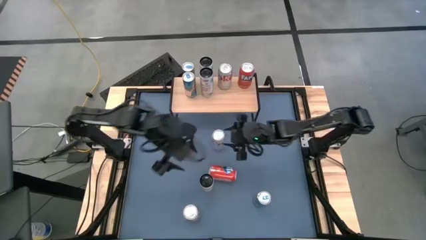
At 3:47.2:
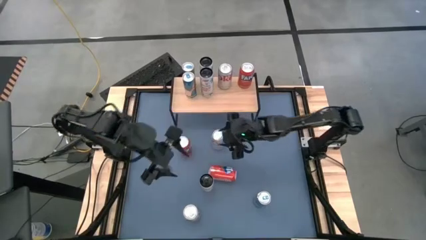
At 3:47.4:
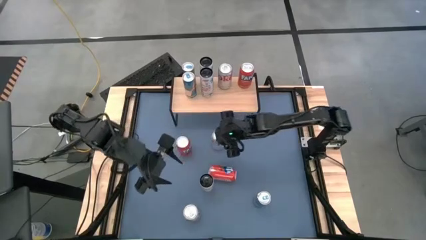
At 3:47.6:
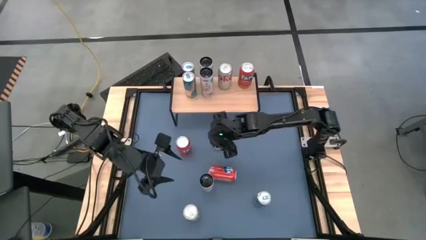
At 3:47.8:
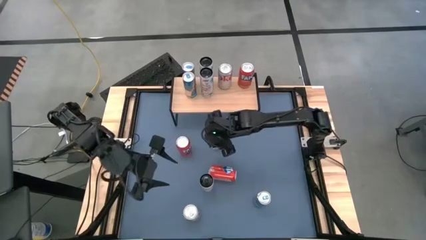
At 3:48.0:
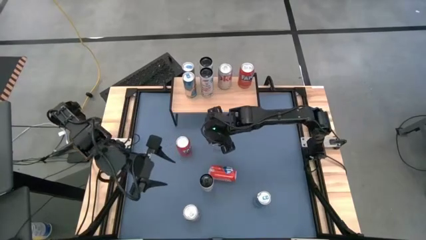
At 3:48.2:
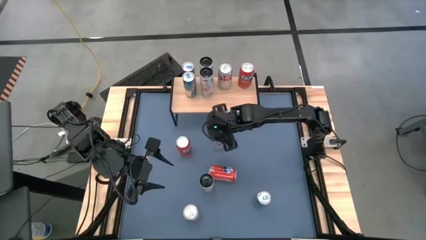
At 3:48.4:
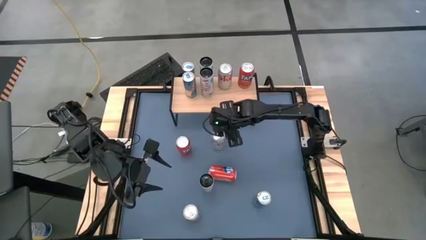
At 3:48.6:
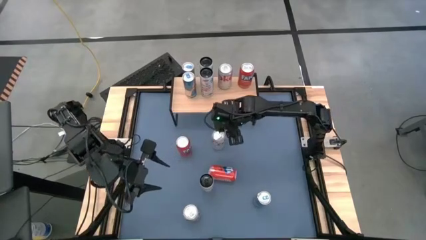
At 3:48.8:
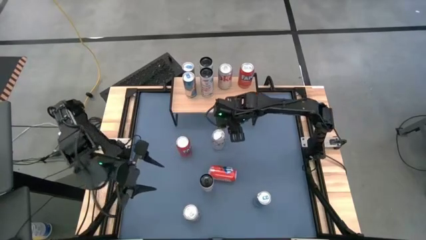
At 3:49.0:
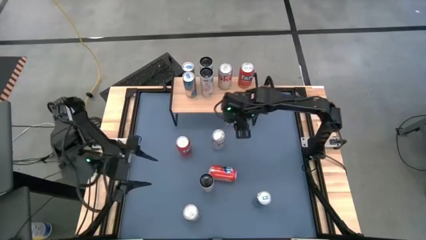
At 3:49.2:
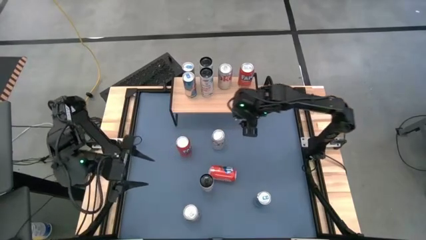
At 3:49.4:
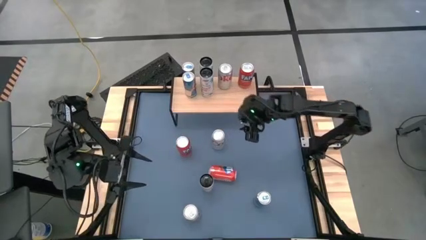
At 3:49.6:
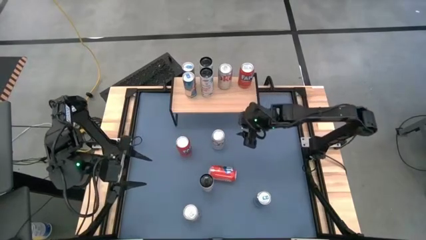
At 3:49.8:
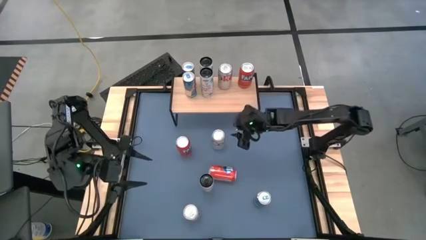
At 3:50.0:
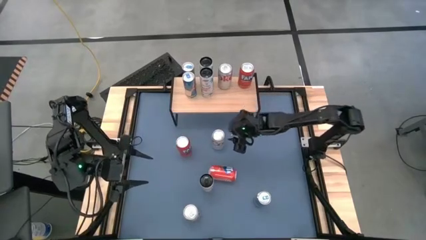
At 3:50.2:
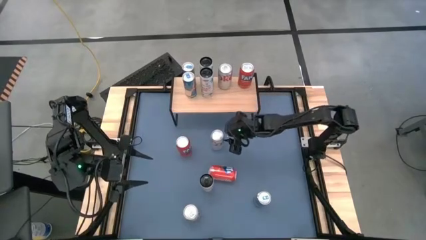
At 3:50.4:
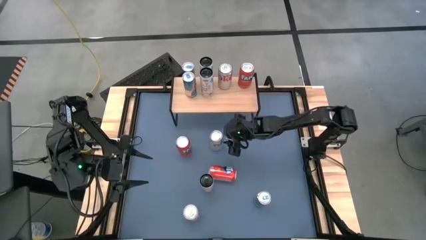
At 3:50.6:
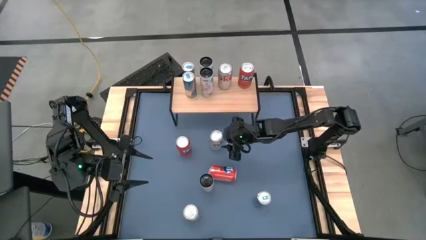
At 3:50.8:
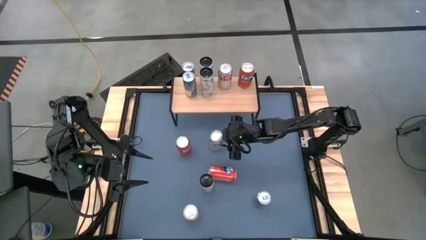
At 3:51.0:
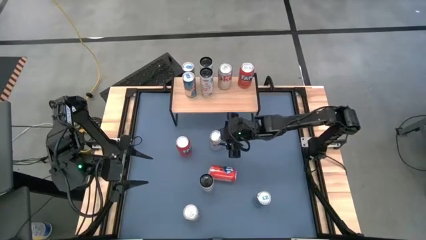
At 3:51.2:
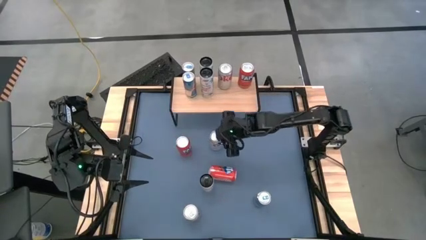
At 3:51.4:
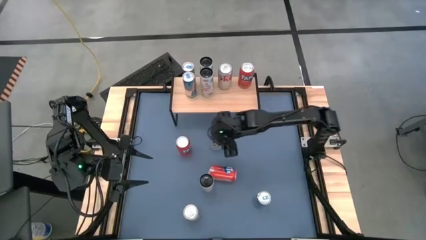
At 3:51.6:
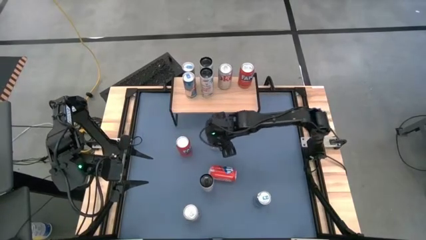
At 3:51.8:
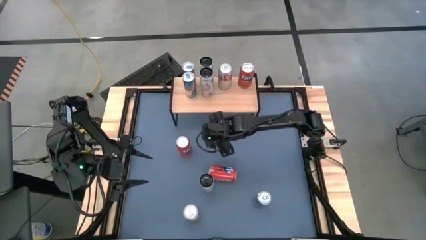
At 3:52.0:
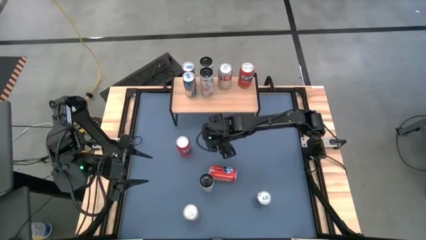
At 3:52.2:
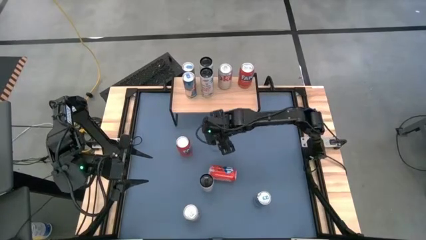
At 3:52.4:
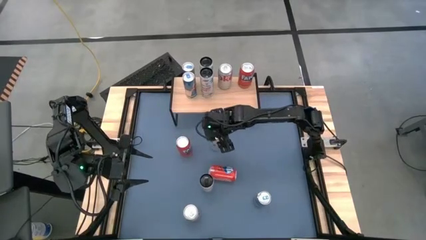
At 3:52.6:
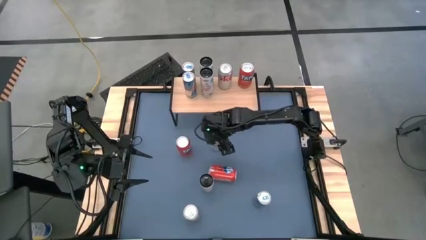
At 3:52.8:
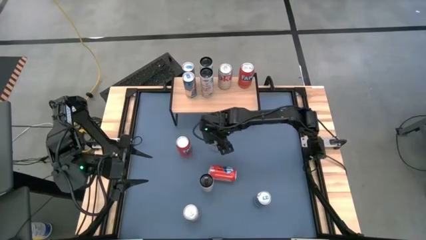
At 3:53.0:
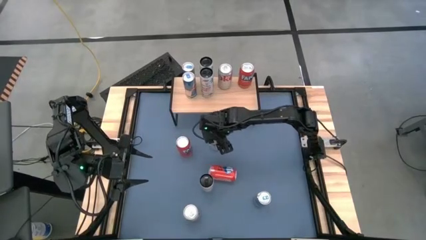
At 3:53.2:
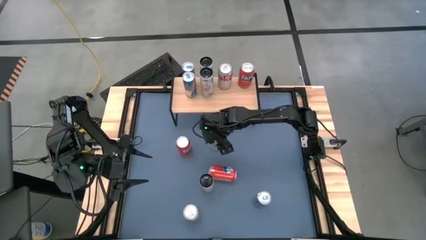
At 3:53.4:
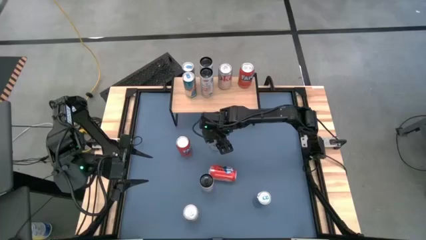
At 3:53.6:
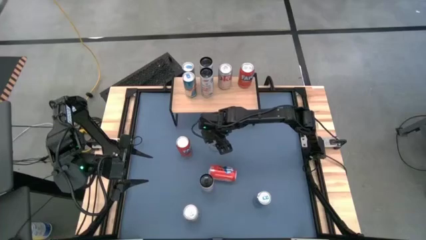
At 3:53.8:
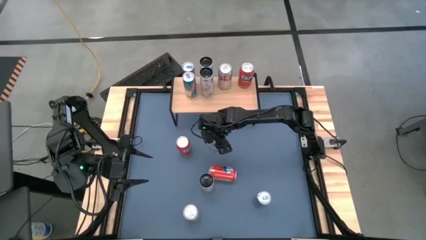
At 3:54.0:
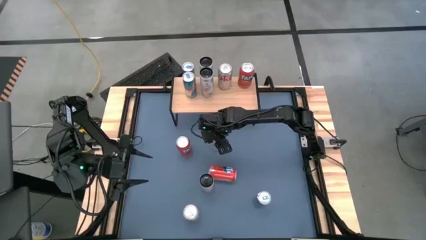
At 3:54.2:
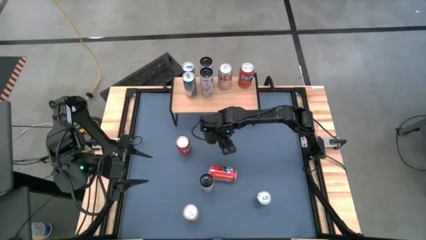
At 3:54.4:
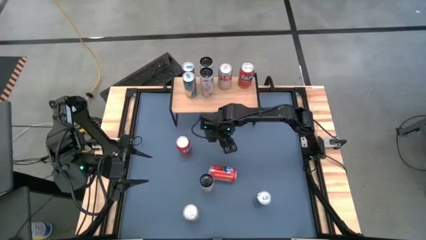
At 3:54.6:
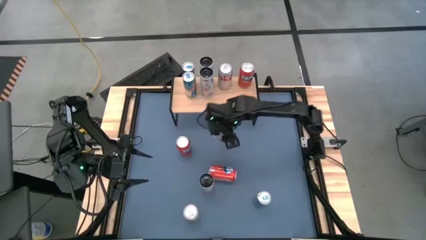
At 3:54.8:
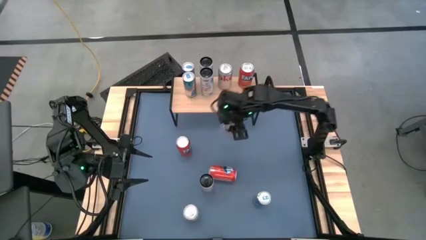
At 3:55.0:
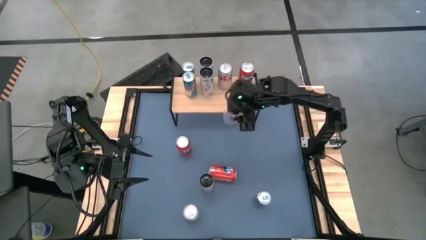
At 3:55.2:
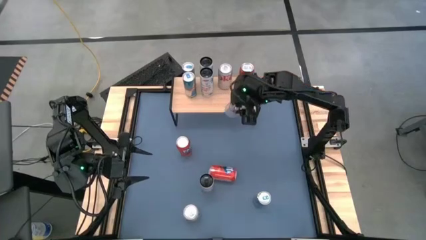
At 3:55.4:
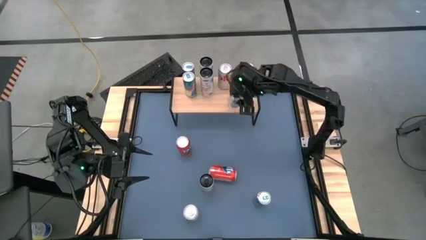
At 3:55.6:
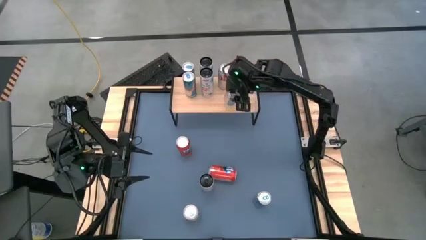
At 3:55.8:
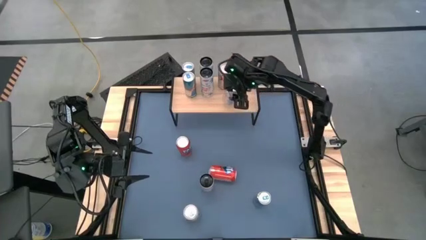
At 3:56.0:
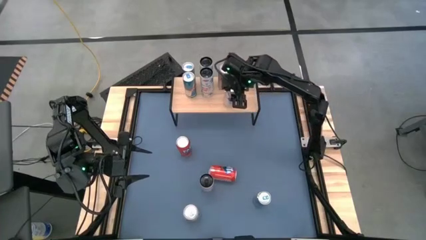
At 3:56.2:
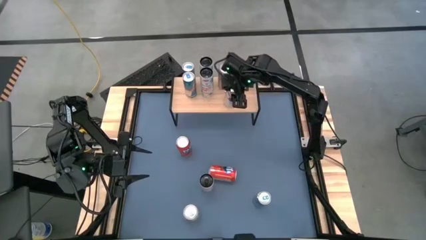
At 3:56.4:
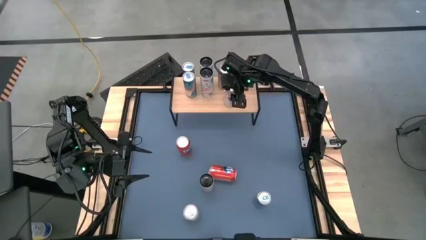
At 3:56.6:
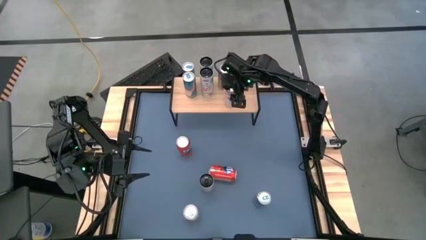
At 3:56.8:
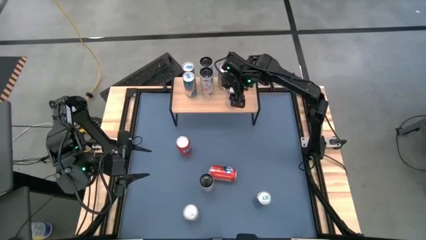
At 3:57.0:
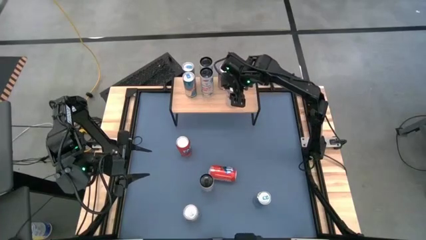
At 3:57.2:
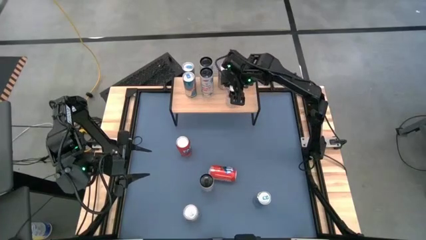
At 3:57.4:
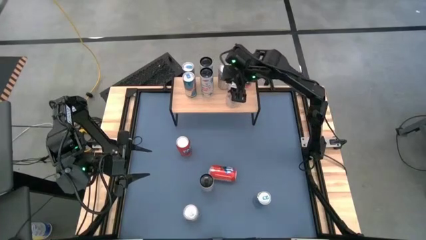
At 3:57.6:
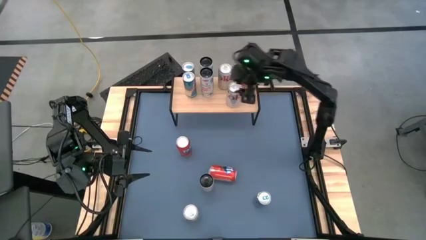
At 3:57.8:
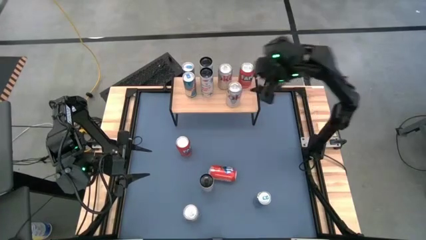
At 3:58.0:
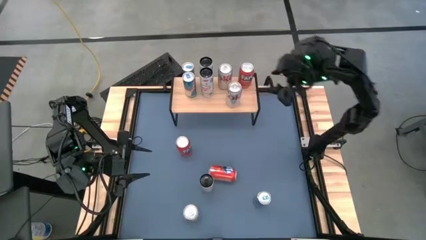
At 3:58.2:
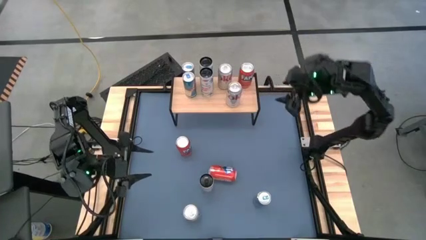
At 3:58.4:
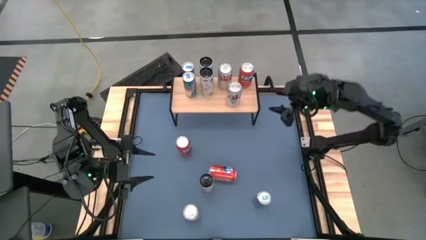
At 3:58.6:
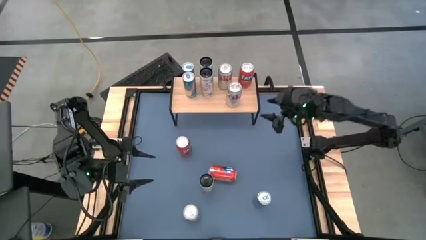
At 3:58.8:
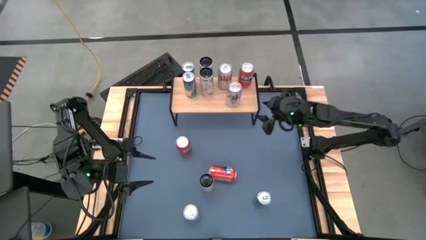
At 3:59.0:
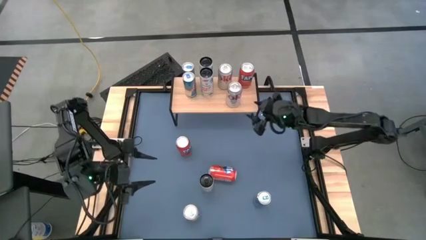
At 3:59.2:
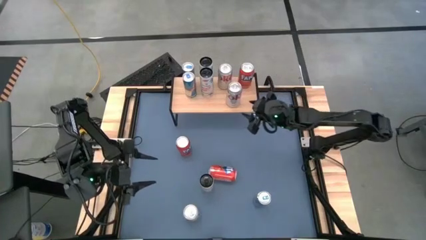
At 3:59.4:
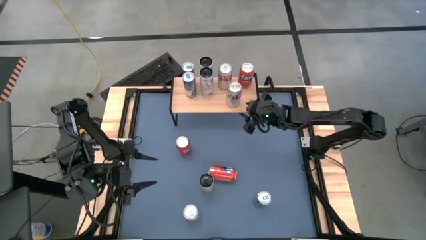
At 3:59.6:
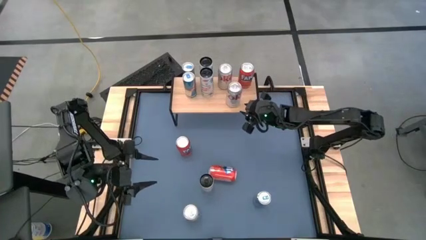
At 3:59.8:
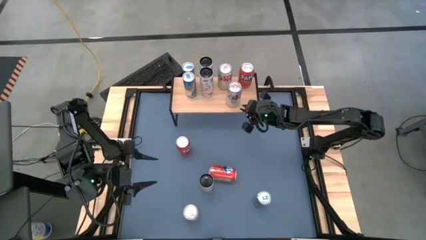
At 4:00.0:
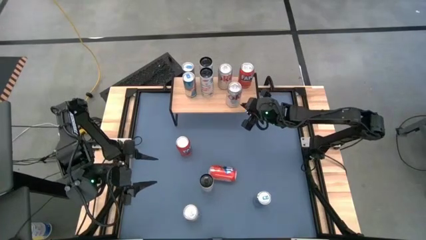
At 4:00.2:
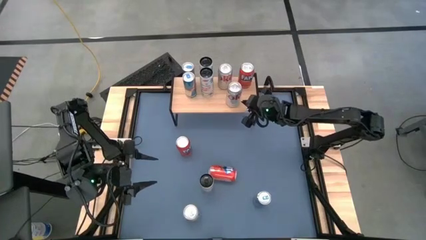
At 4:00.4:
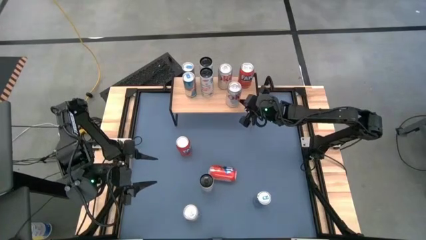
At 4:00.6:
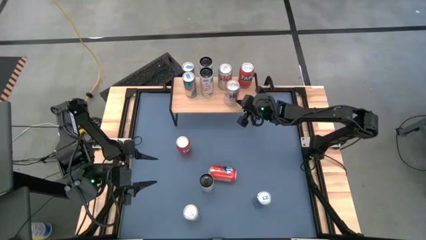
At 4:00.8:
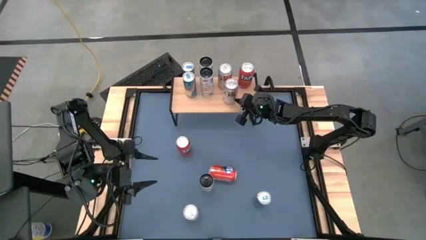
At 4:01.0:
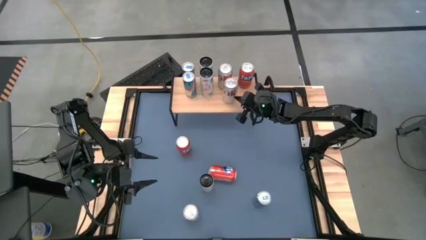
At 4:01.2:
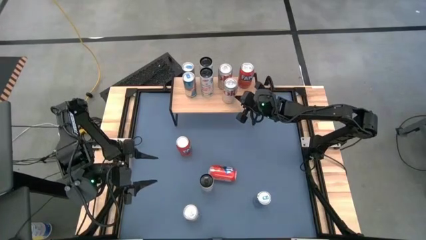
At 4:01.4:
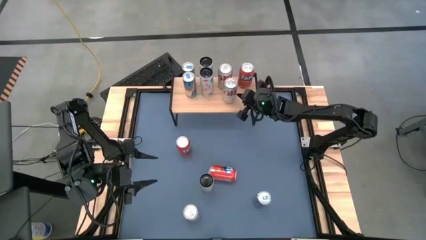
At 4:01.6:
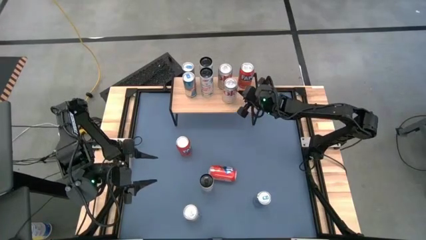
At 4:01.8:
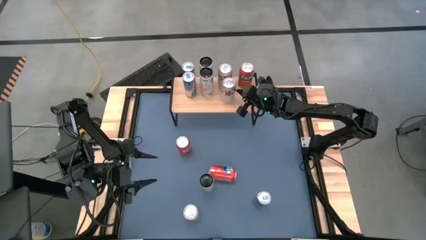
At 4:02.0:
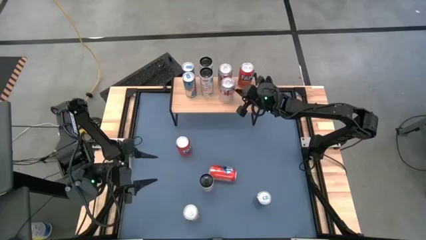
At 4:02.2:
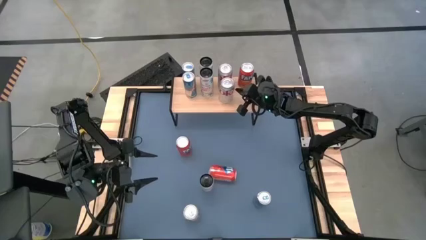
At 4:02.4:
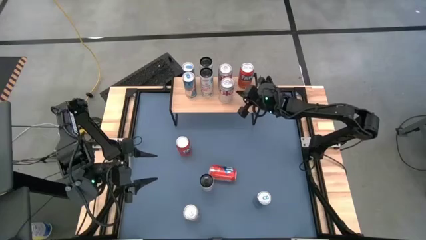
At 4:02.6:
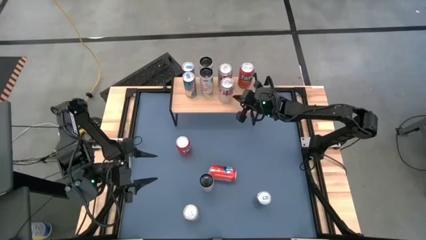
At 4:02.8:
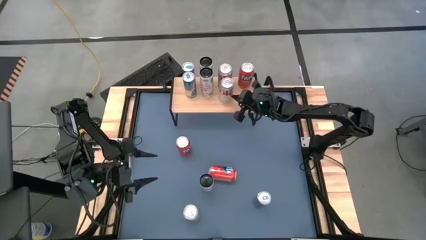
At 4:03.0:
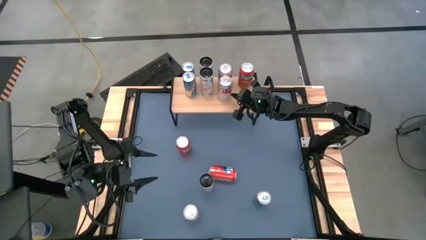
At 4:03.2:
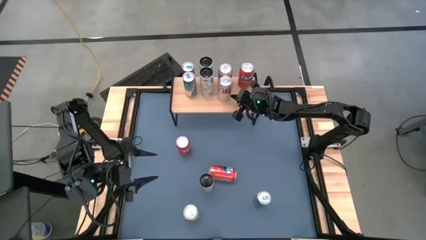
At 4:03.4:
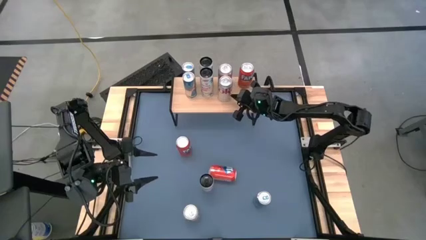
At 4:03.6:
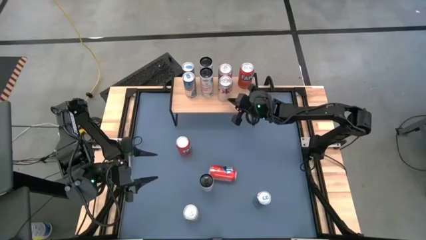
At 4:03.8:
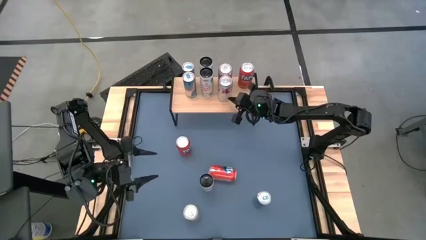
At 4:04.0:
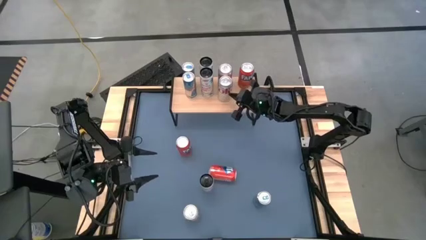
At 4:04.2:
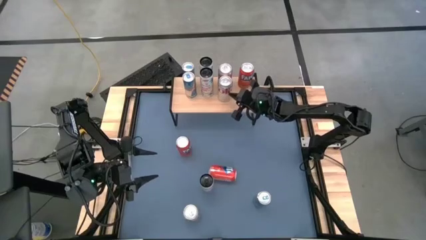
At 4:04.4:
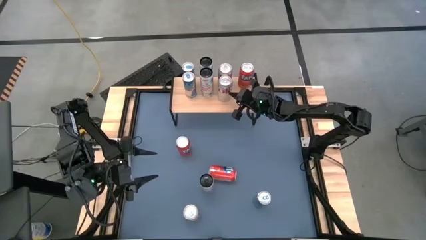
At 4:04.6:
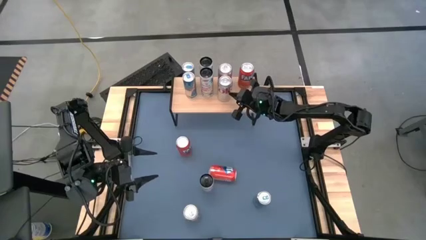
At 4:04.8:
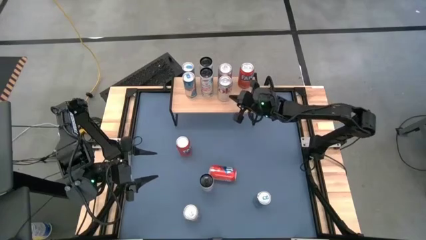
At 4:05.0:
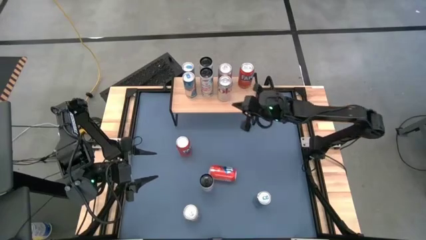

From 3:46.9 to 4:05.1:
Task: Place canned beverage on shelf
Put the center silver soda can on the shelf aligned with the other silver soda can
